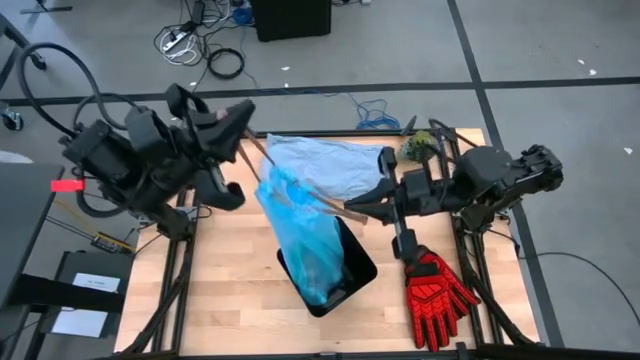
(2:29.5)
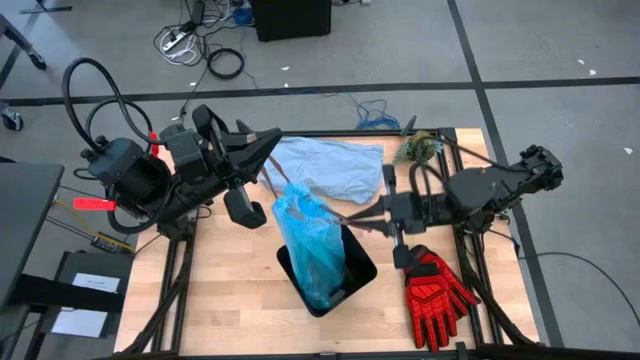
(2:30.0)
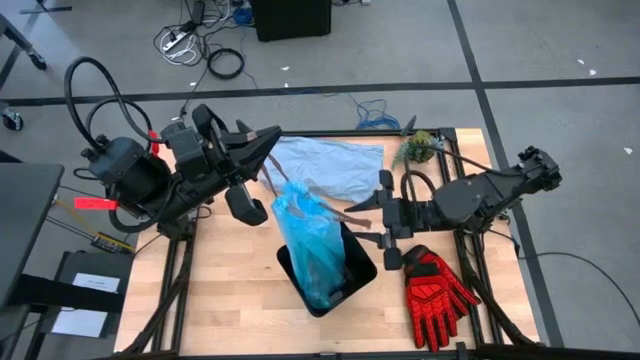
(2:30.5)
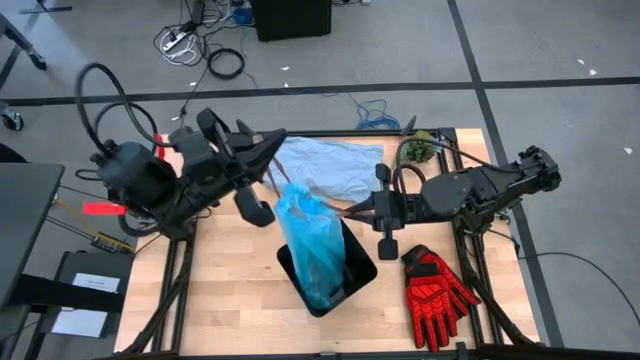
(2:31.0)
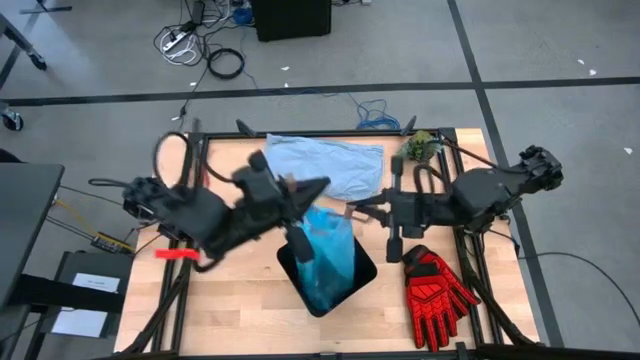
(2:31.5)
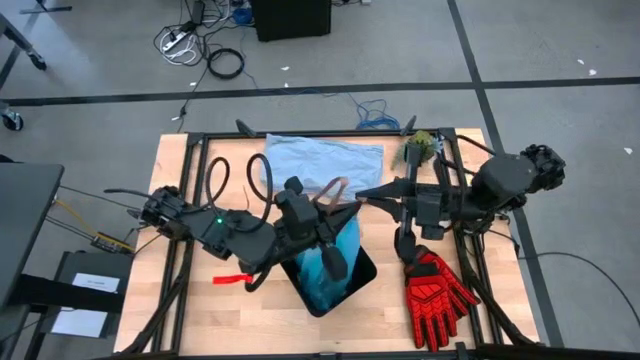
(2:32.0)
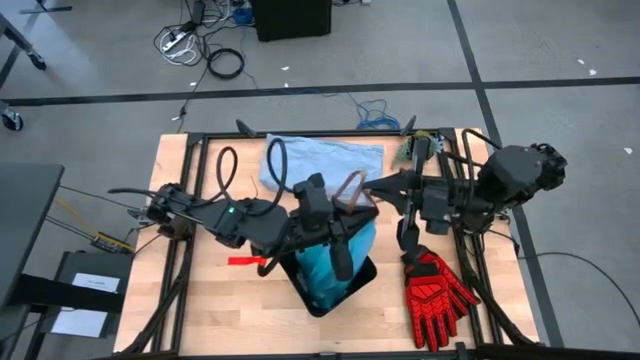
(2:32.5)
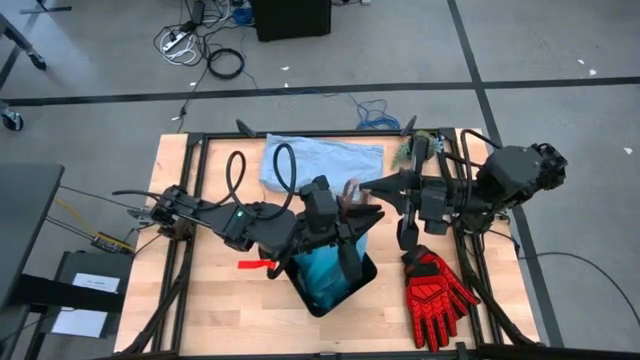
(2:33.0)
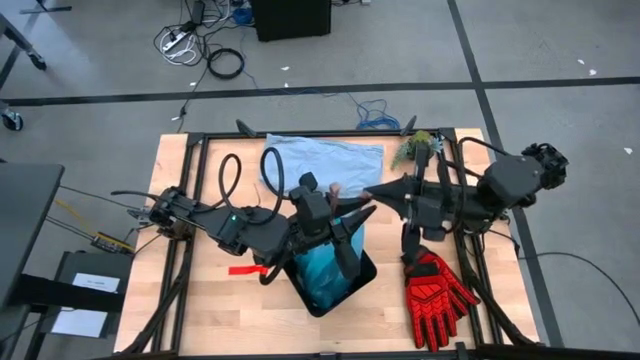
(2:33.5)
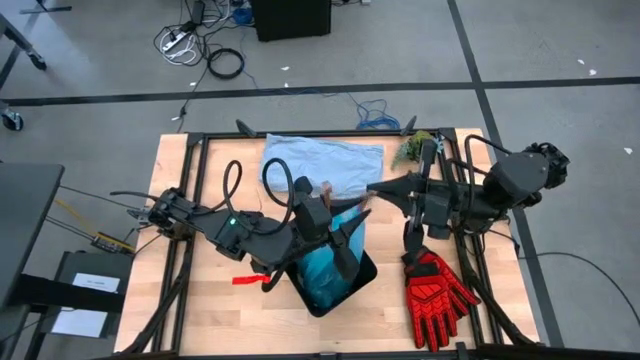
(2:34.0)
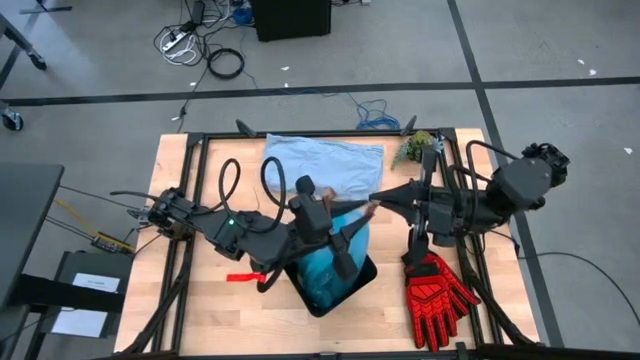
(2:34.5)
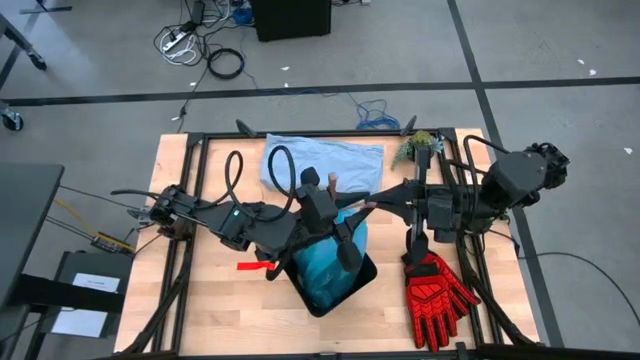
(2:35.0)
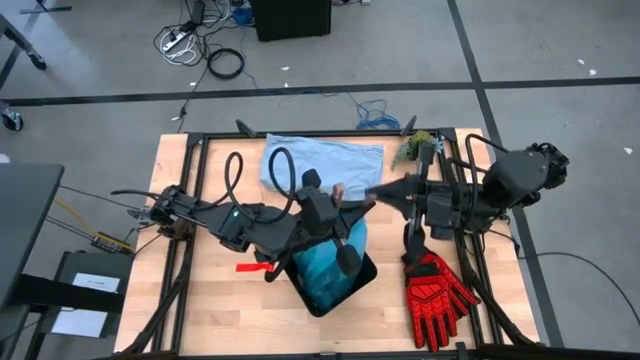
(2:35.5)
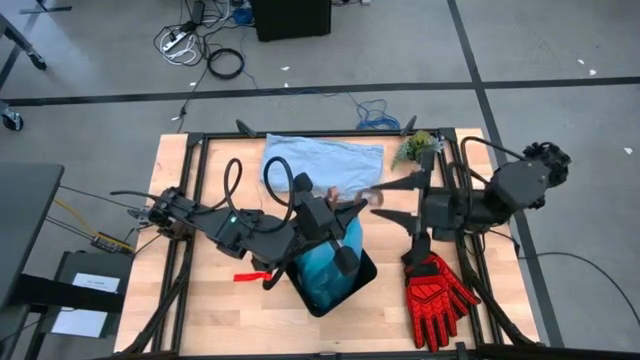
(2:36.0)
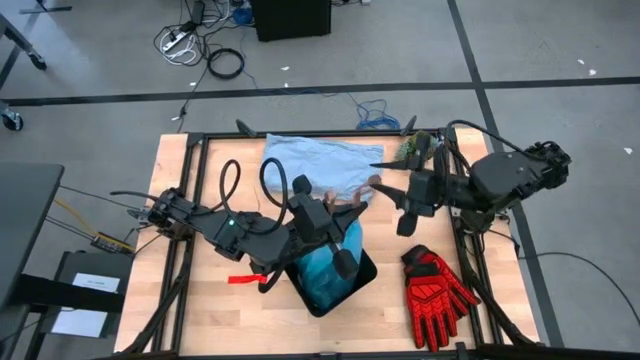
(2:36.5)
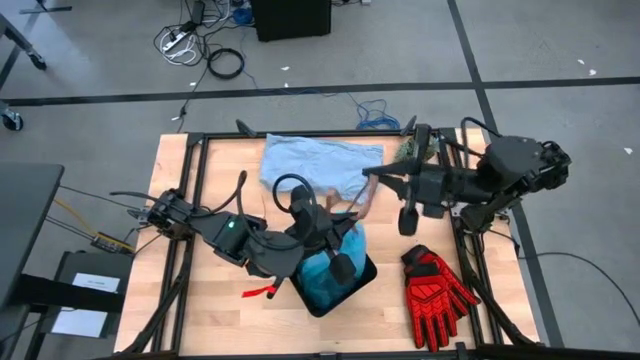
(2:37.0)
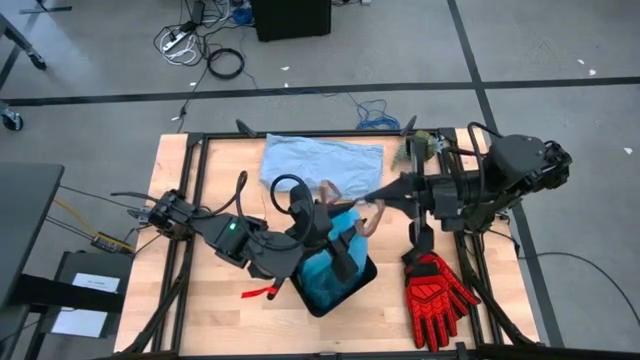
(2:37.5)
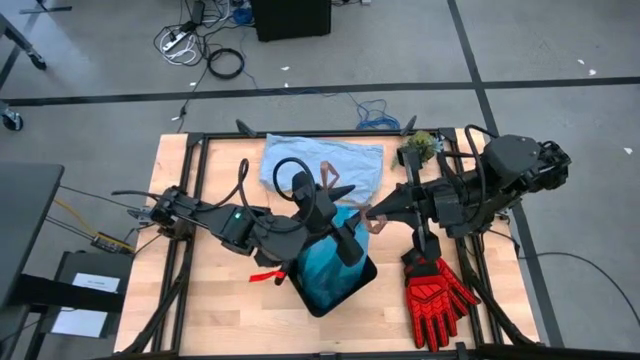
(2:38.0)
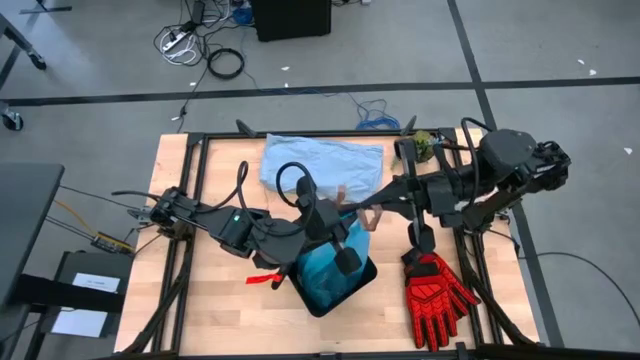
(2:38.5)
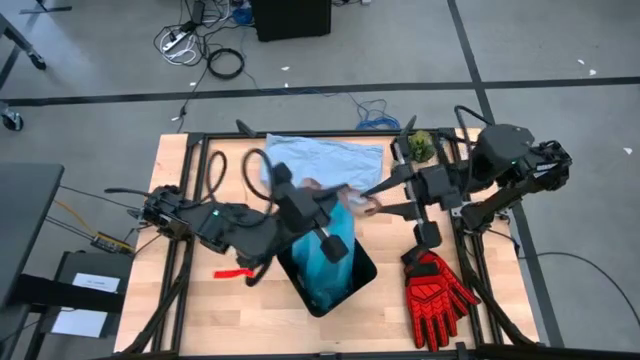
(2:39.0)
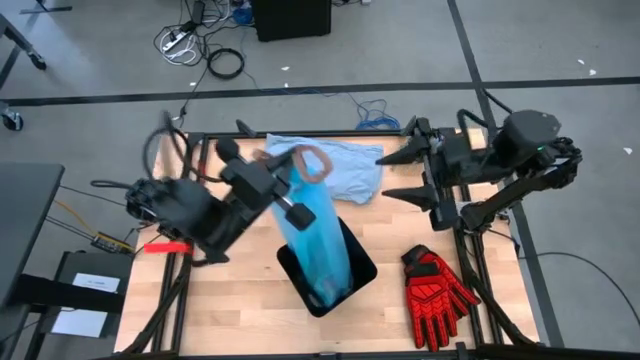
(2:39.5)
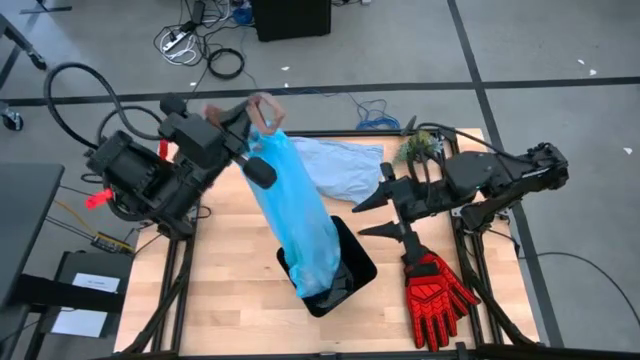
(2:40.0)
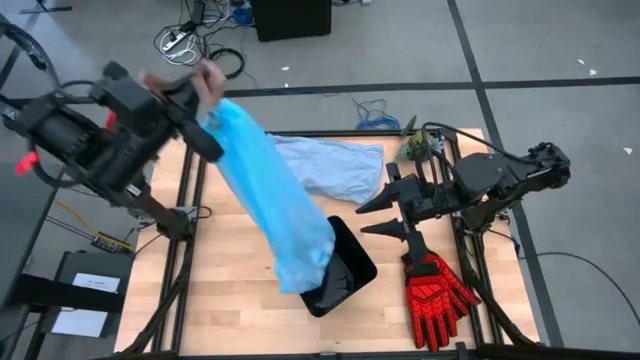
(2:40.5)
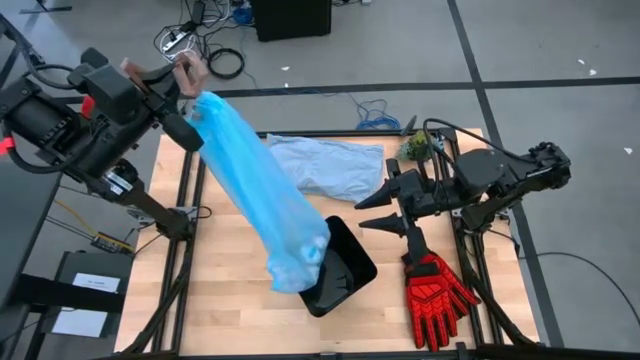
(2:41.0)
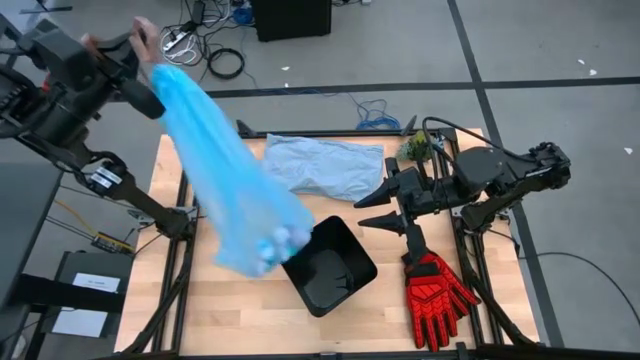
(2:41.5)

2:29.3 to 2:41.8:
Task: place trash/remove bag and relplace
Remove the light blue trash bag from the trash bin

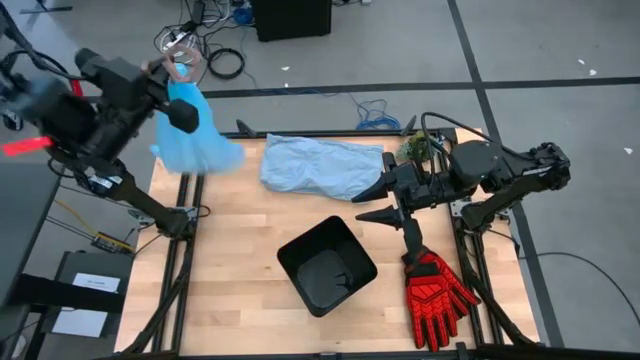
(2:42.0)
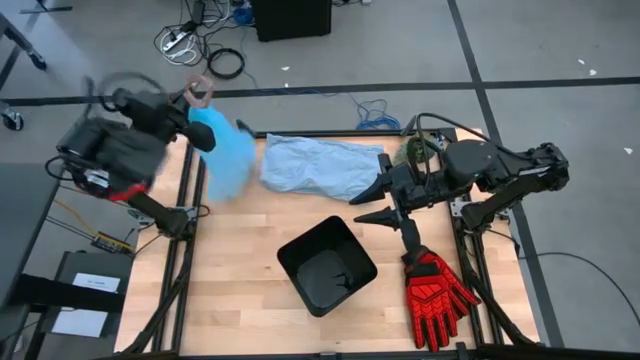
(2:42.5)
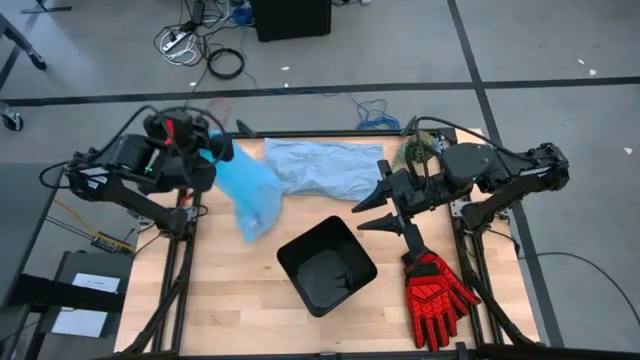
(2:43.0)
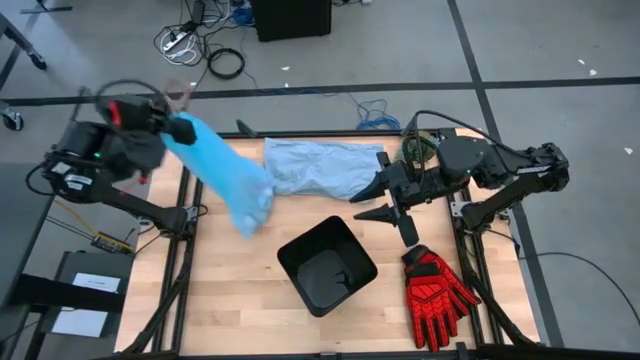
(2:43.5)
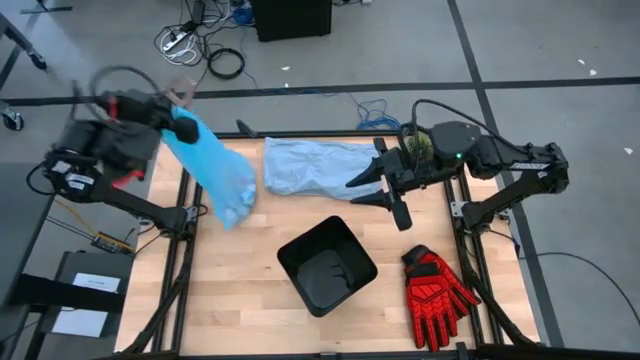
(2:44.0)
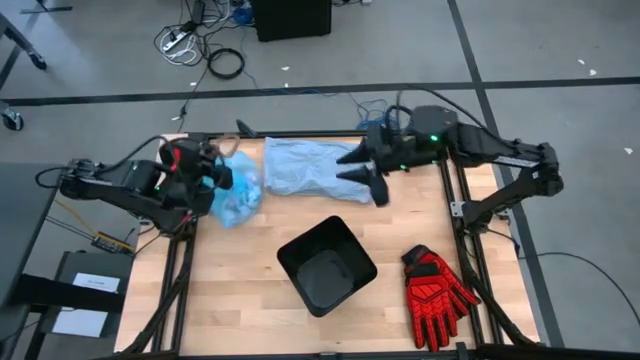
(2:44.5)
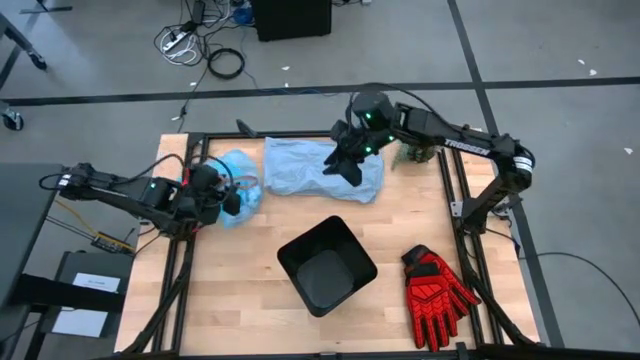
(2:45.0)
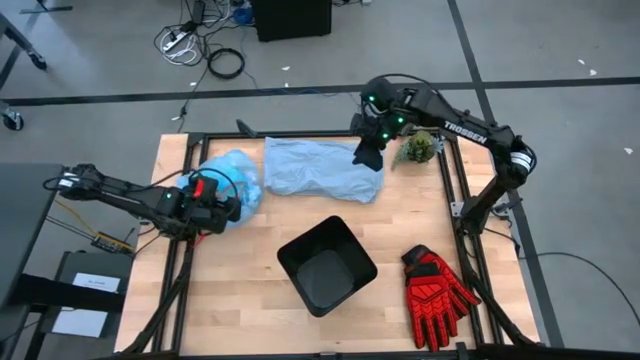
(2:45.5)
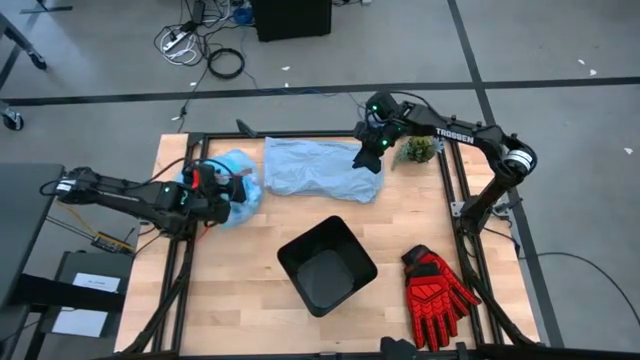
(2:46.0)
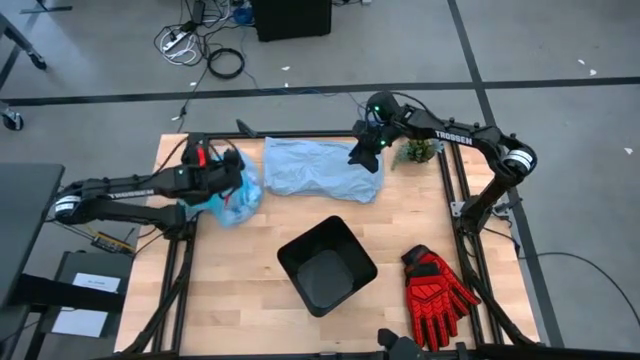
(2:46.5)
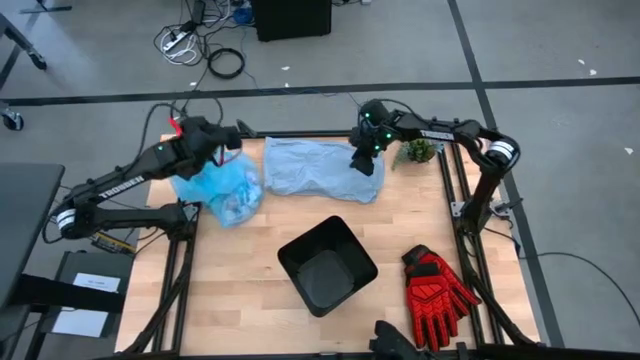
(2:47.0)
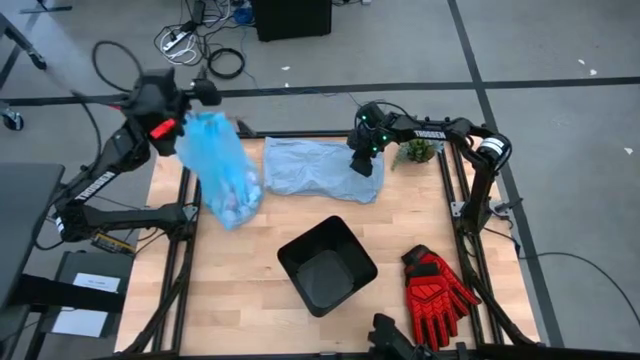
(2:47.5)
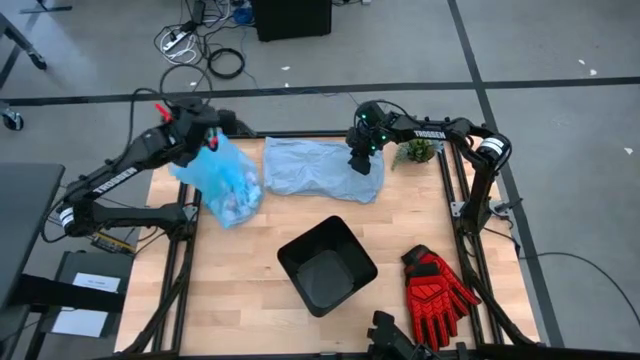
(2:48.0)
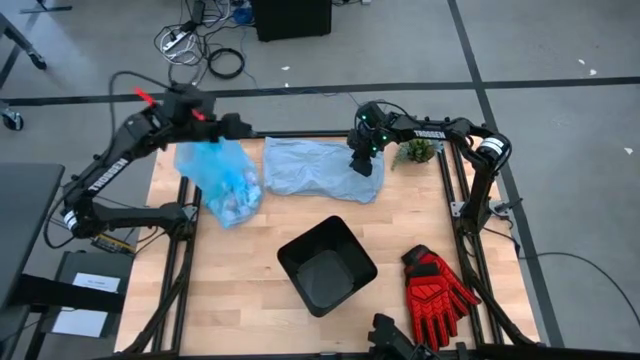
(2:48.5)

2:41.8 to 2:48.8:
Put the light blue trash bag from center to upper left of the table

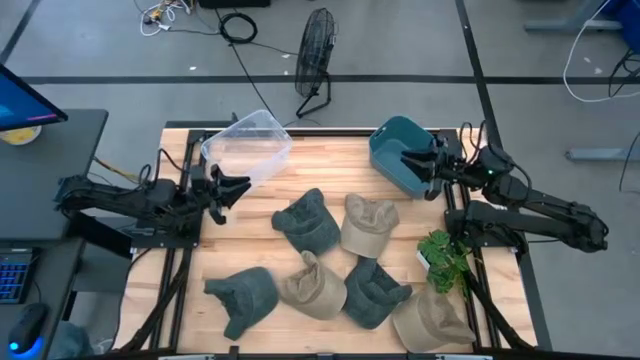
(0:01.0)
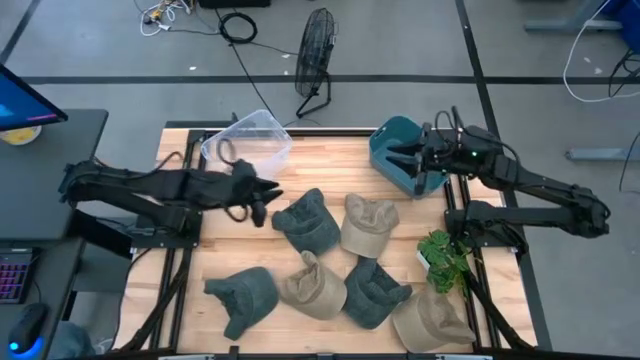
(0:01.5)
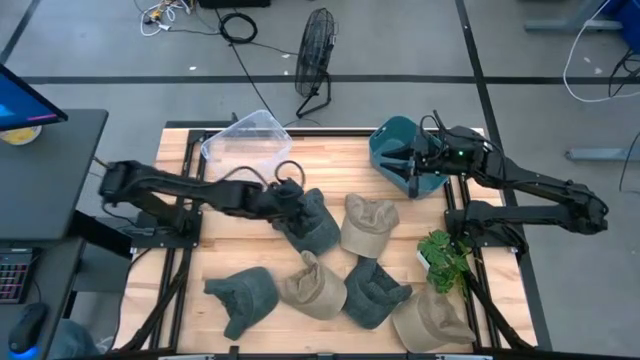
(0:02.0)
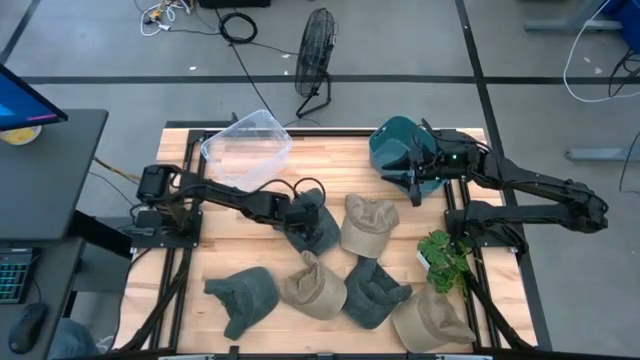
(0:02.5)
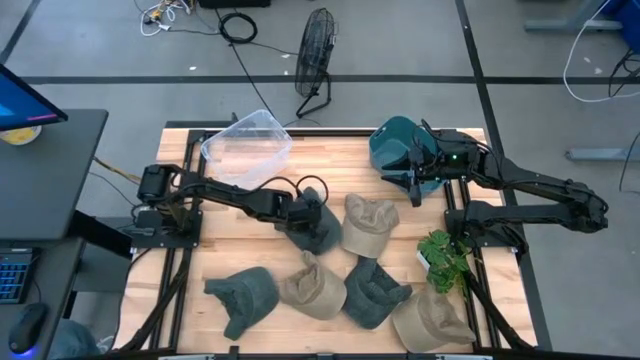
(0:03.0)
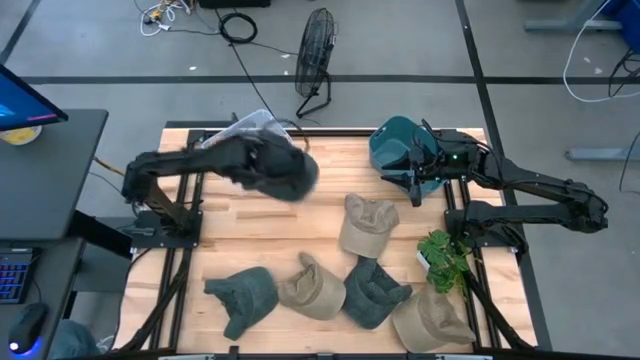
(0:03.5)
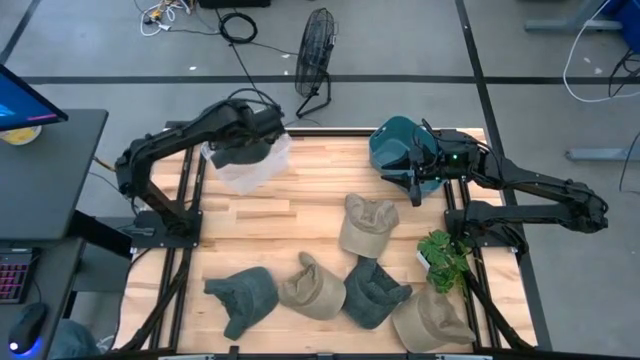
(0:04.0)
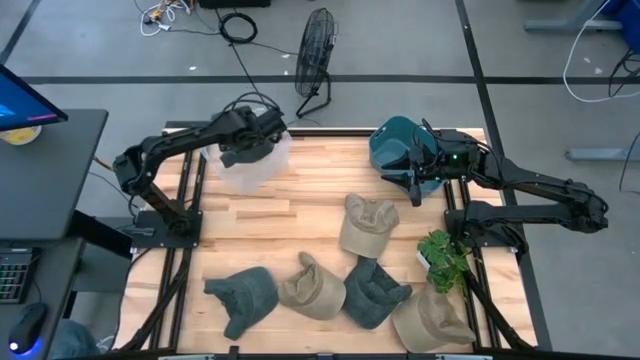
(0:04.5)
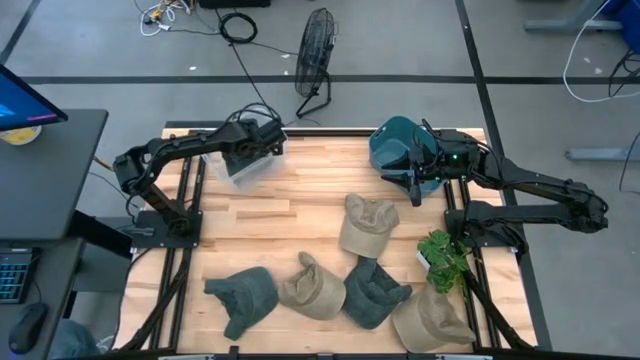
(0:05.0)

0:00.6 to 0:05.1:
Task: Pick & Place hat
Put the top gray cap into the transparent bin
